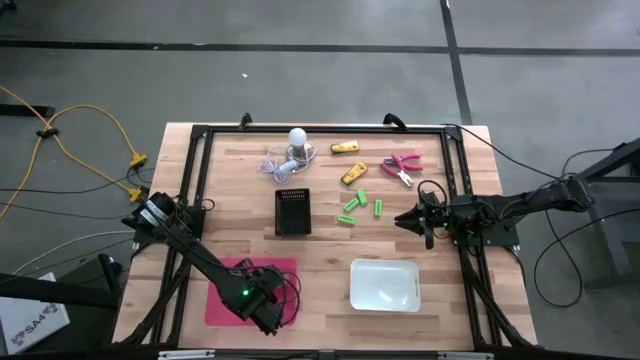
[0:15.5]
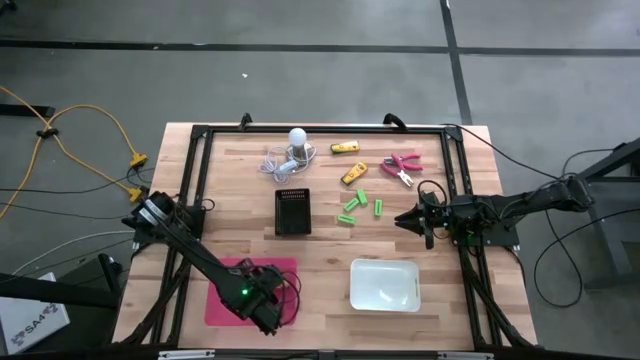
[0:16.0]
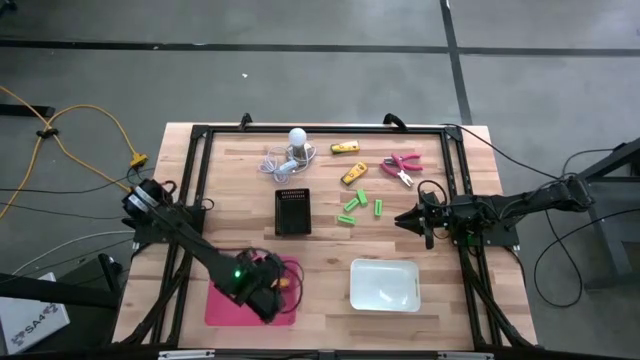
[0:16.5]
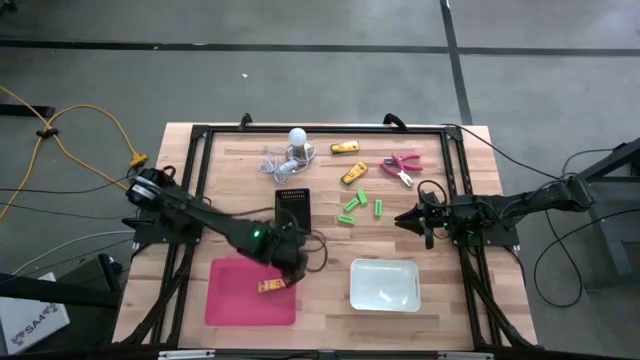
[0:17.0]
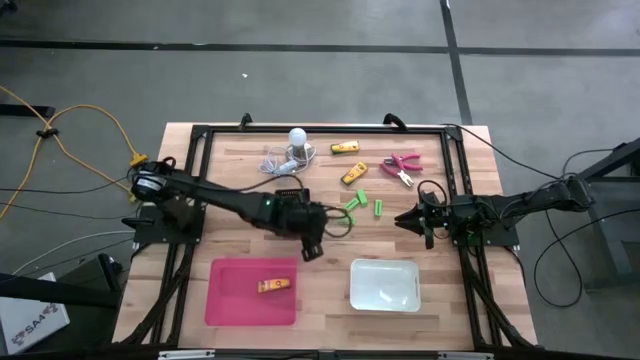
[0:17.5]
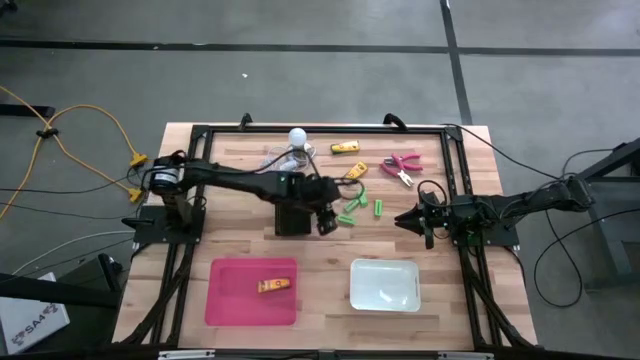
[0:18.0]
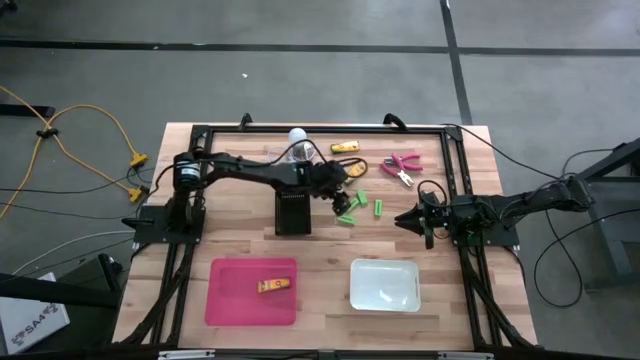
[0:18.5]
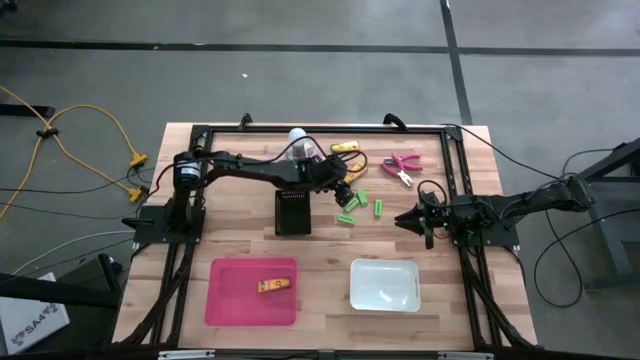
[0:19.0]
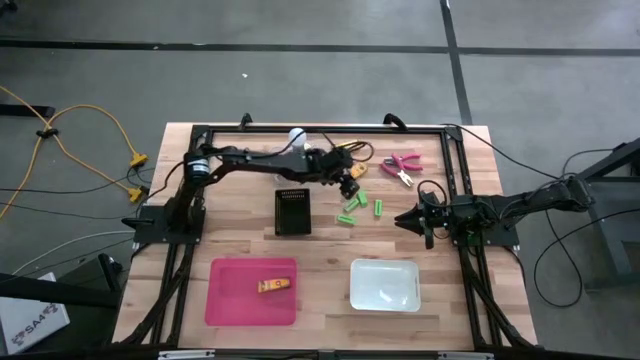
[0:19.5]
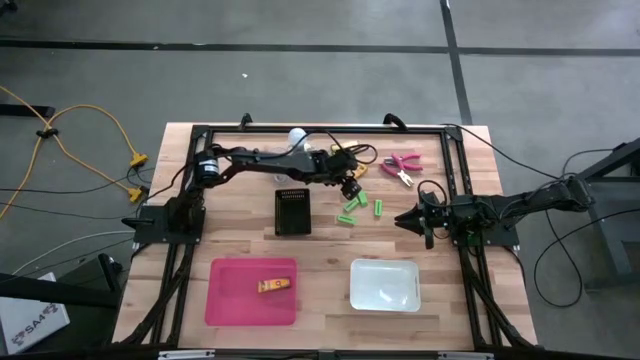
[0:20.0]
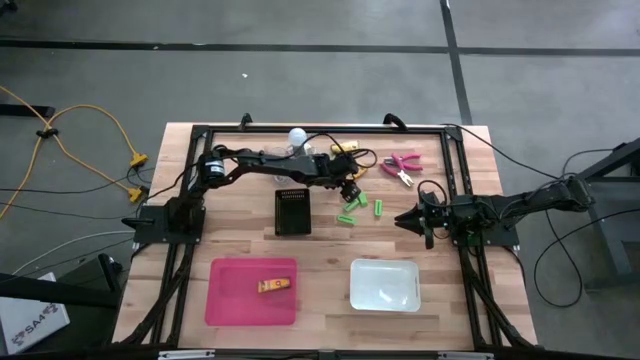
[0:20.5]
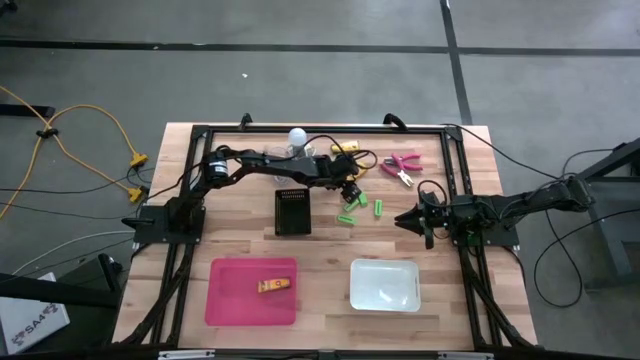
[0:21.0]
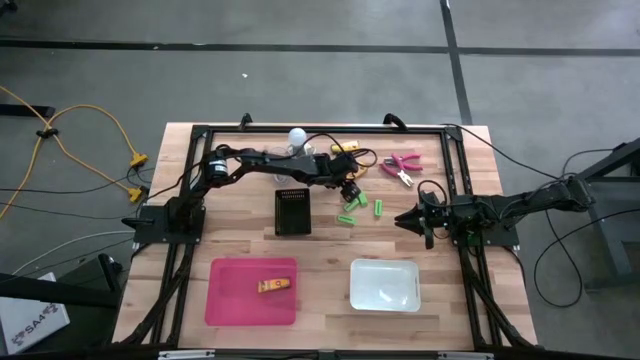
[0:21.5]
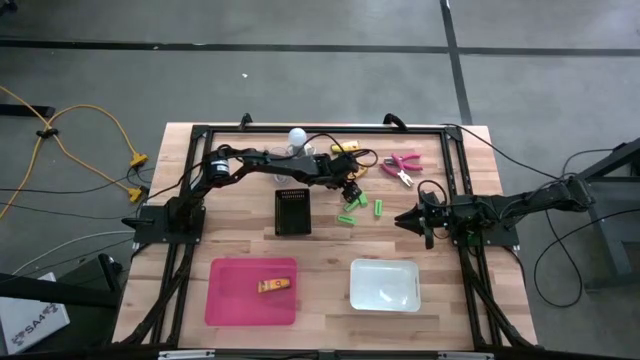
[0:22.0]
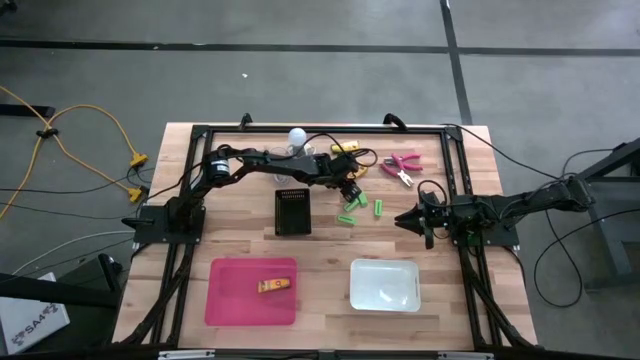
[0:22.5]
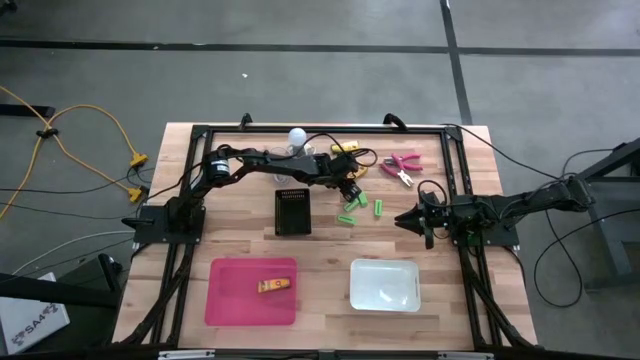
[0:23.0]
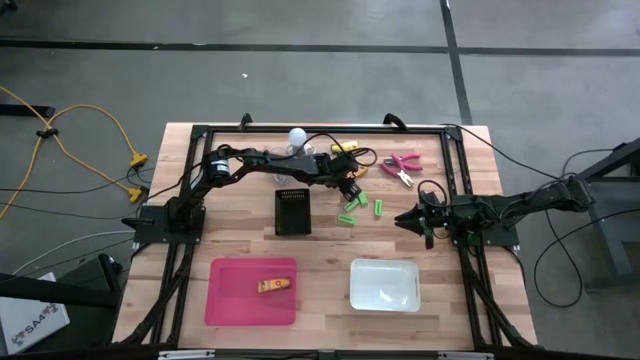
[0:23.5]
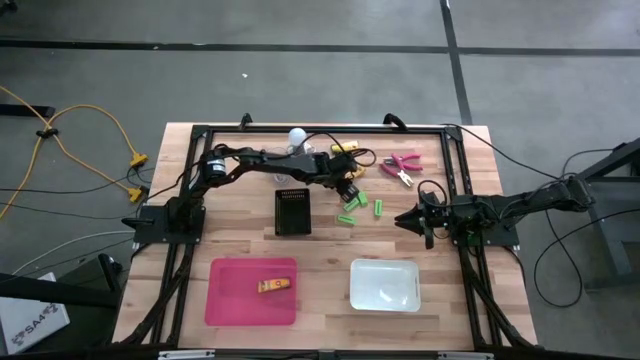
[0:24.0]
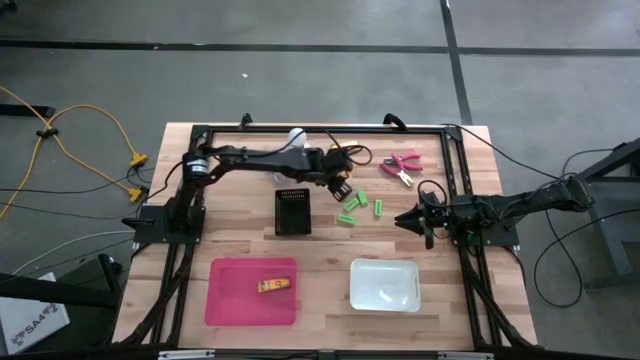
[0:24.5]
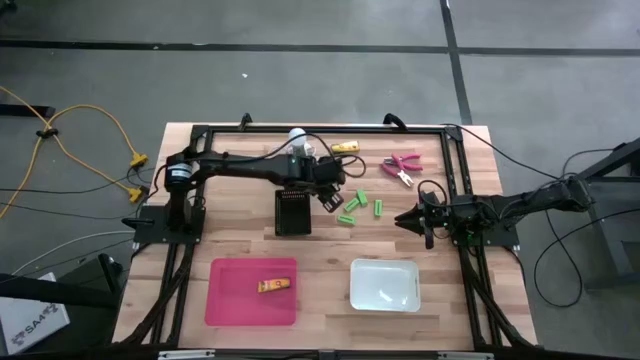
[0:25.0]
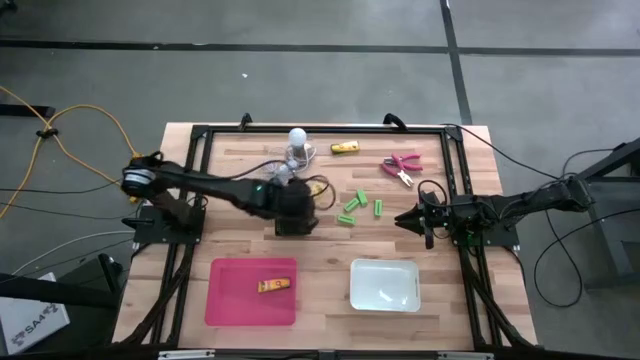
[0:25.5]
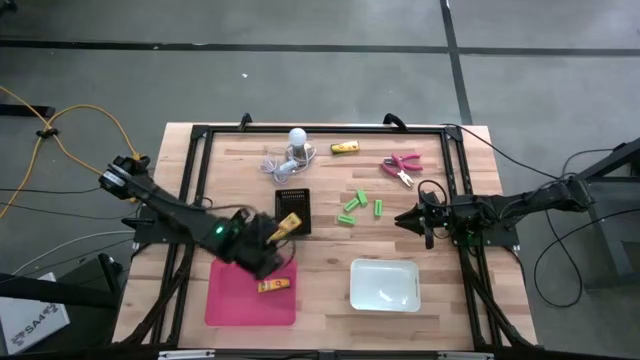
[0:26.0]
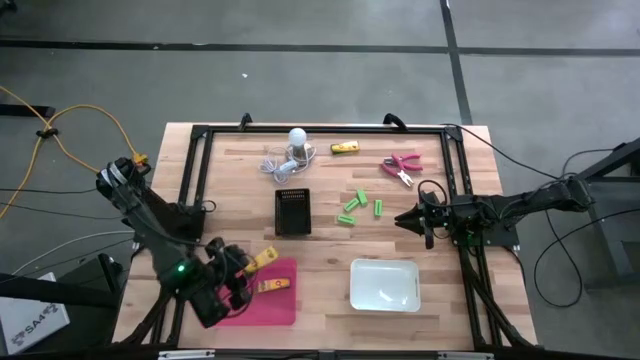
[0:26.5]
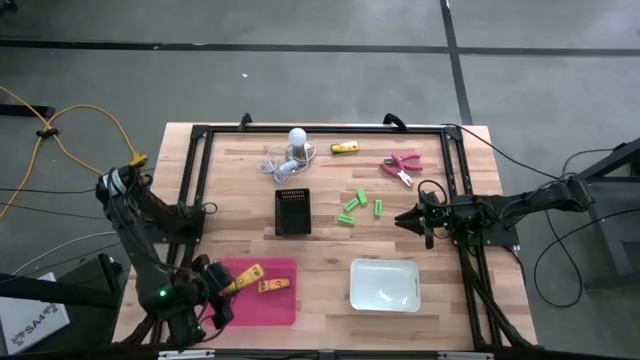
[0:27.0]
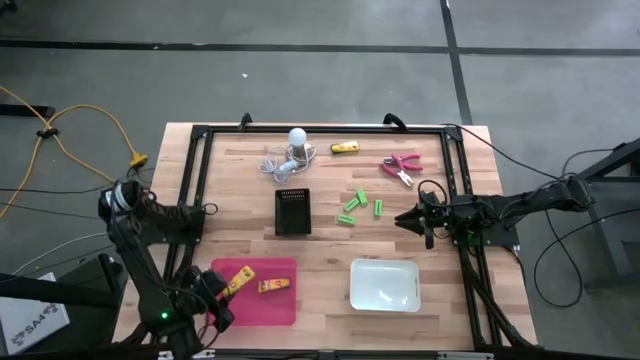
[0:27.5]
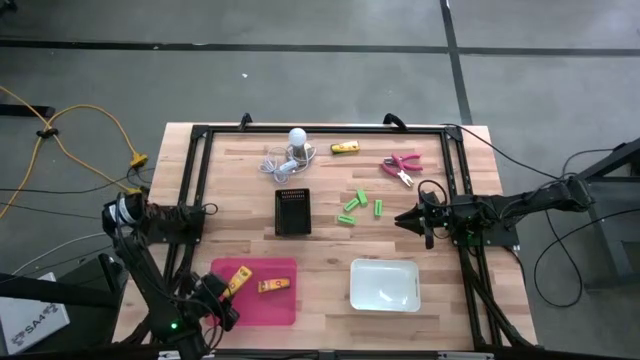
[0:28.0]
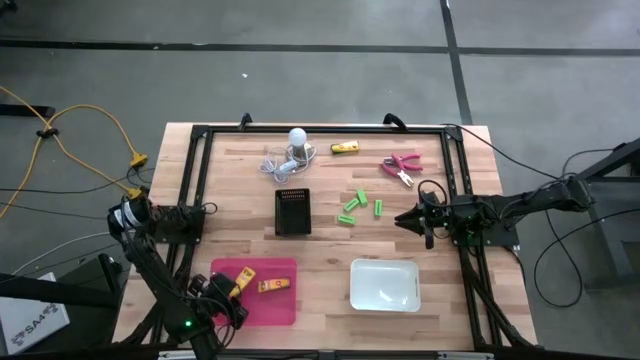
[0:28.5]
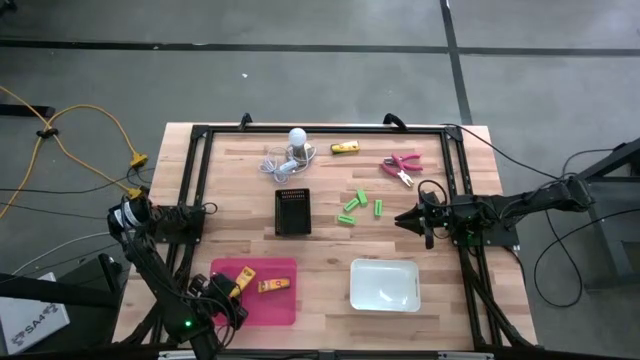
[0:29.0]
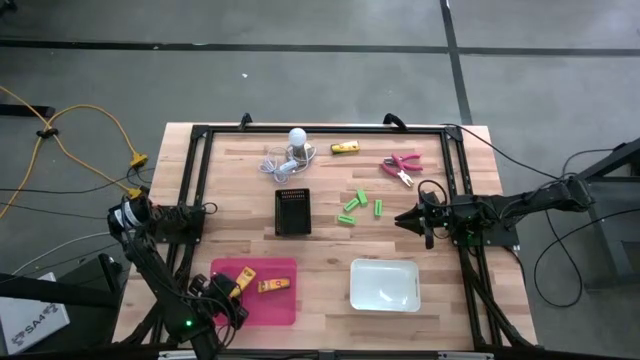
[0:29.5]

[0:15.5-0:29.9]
Task: Pick & Place School Supplies
Put the yellow crayon box into the pink bin

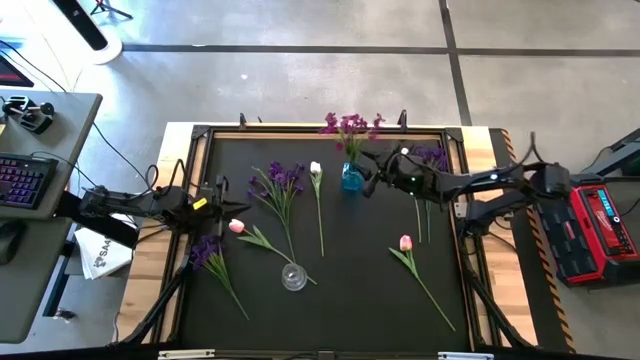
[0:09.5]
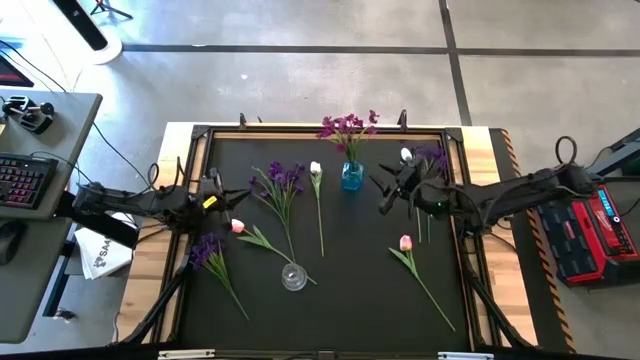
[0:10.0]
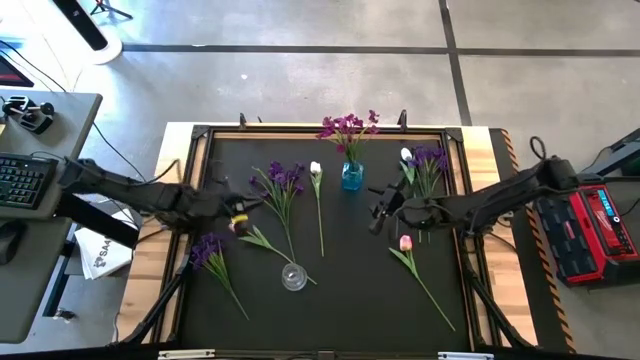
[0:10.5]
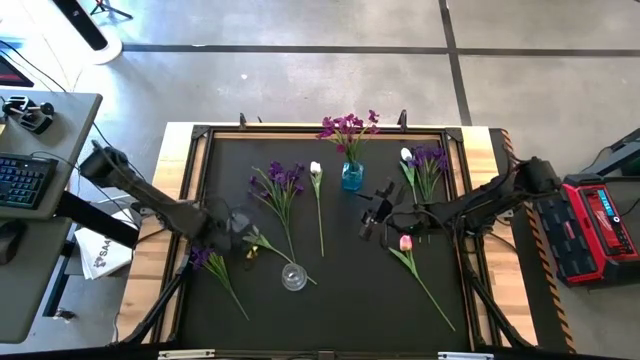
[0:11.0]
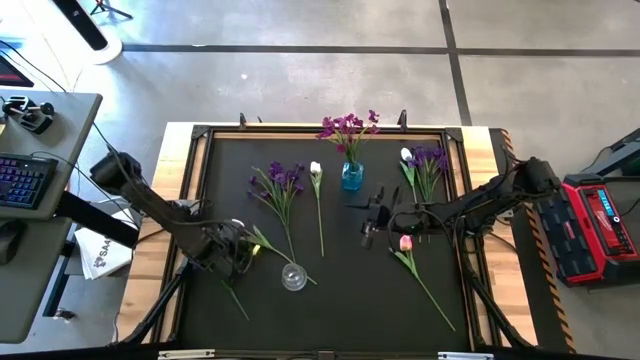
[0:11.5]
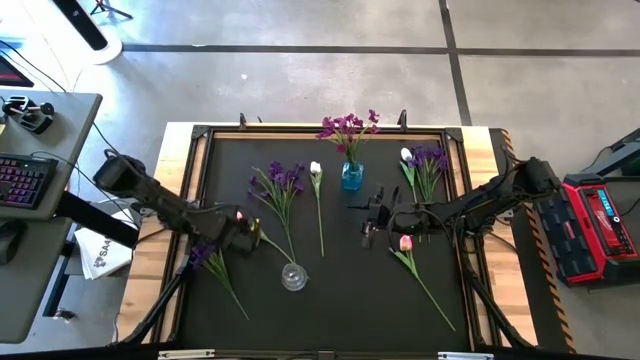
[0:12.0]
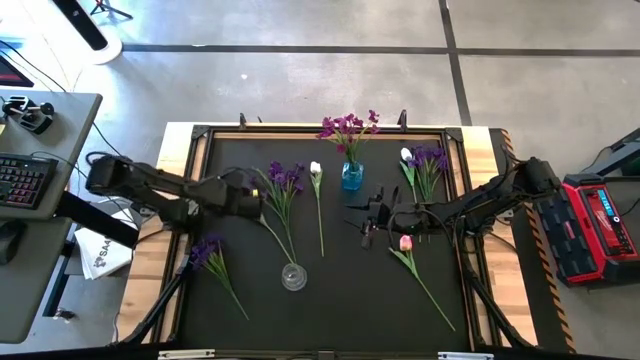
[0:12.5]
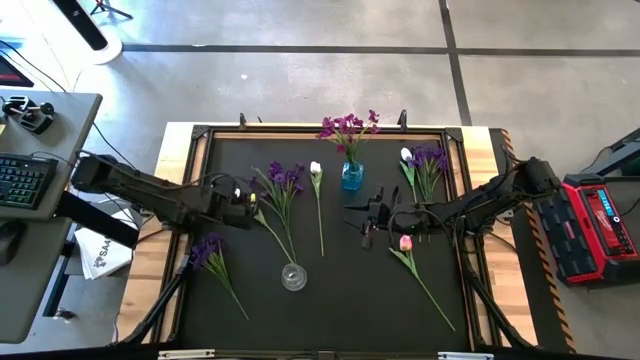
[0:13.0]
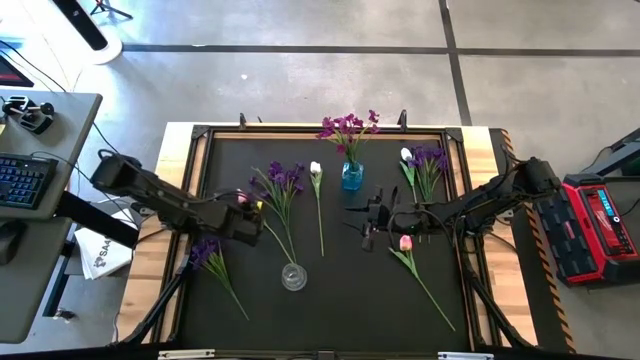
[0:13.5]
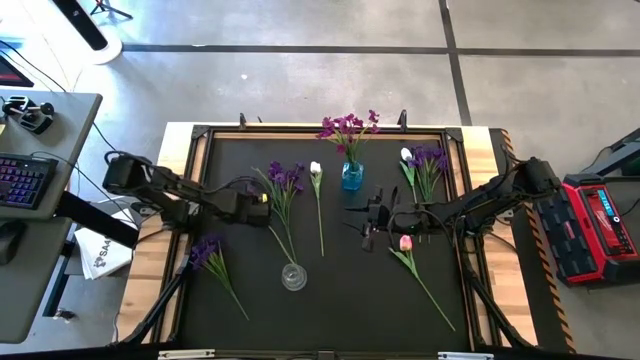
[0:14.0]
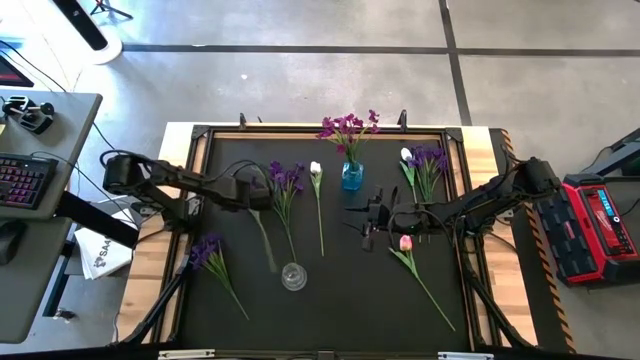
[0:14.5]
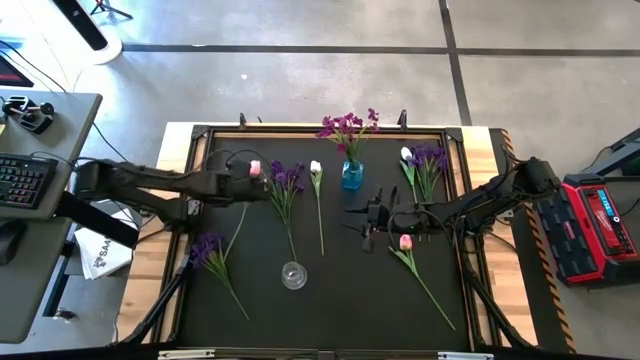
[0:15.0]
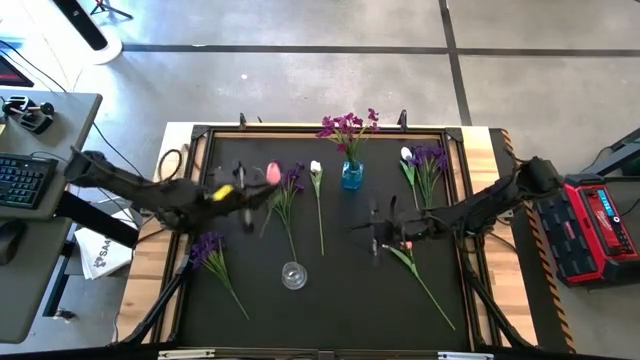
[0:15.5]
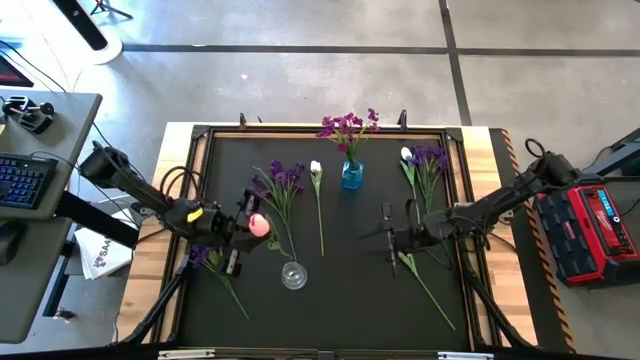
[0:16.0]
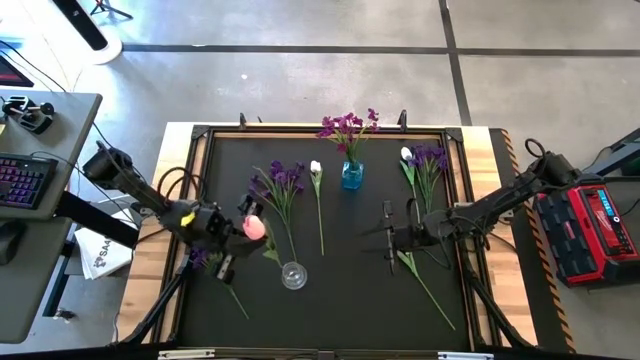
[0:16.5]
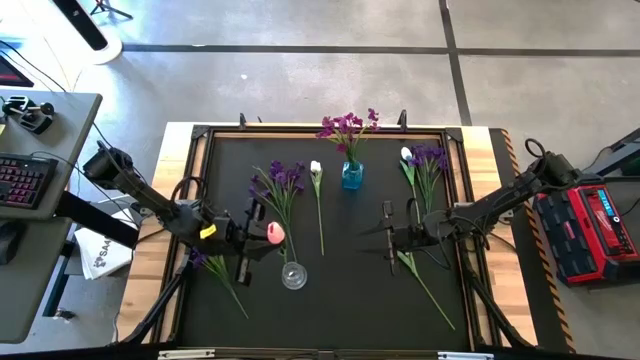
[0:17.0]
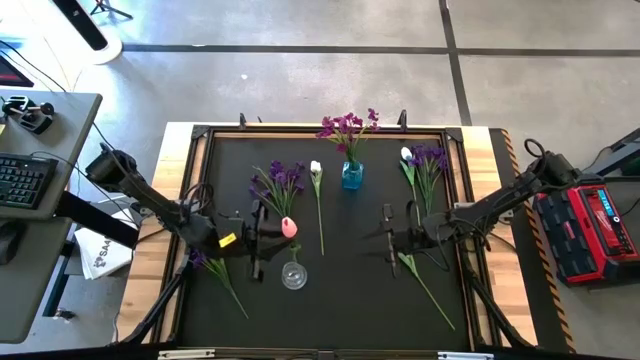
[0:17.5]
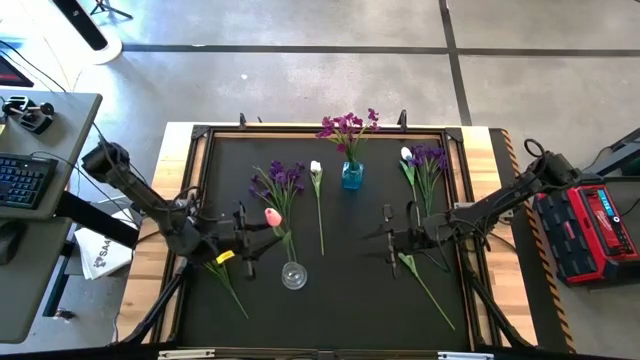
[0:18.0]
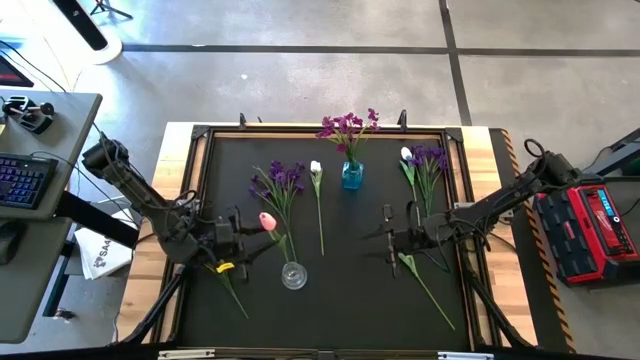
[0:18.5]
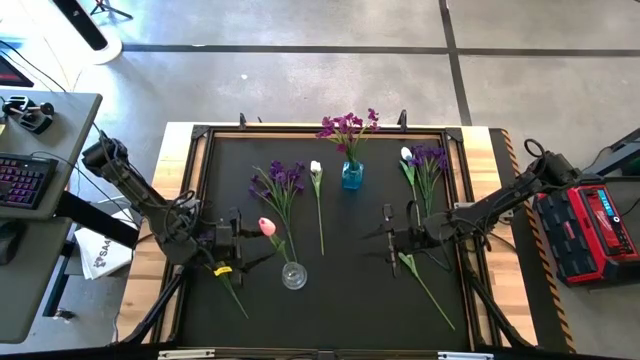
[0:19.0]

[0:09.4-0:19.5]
Task: Sort flowers into vase by color
Put the left pink flower into the transparent vase
